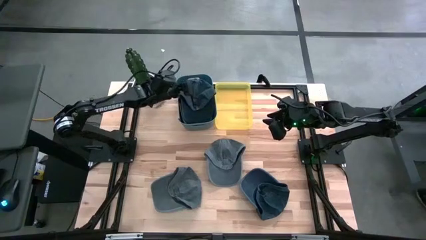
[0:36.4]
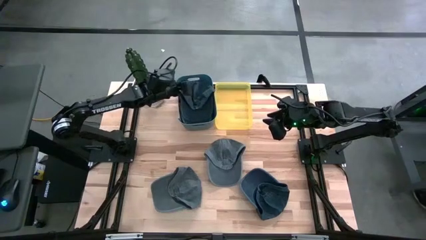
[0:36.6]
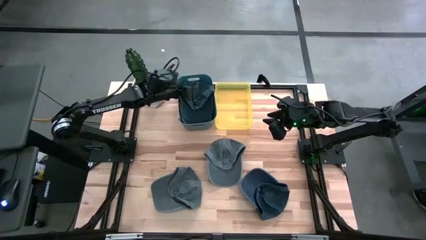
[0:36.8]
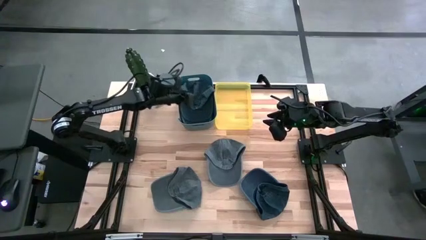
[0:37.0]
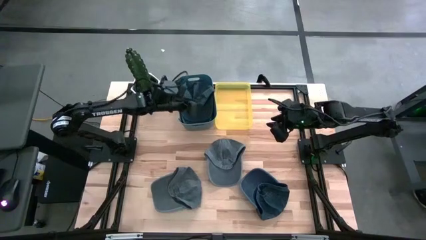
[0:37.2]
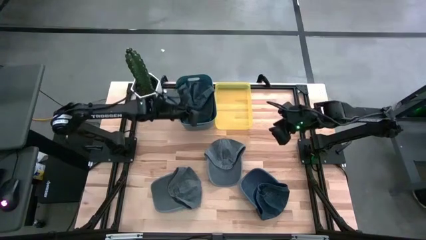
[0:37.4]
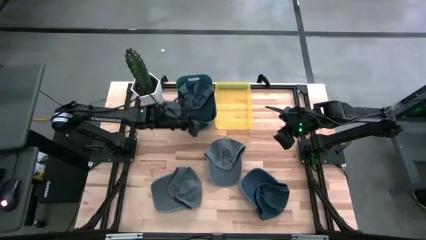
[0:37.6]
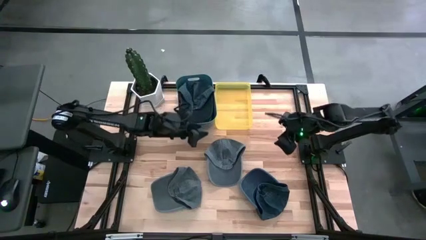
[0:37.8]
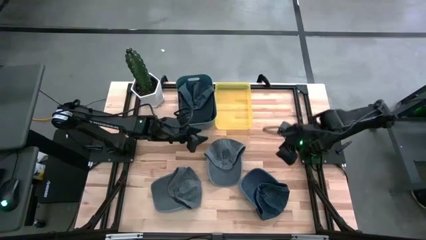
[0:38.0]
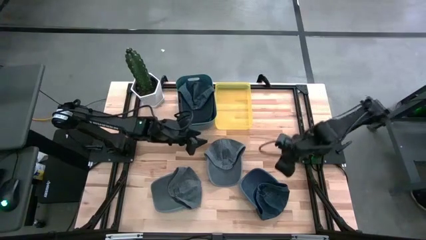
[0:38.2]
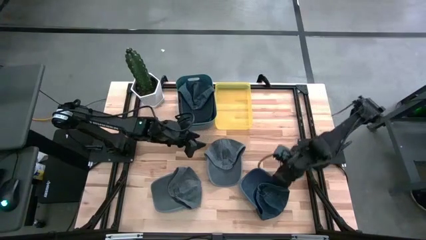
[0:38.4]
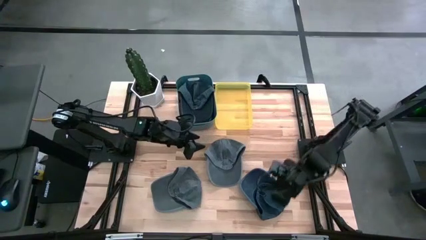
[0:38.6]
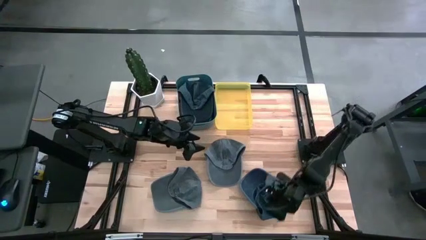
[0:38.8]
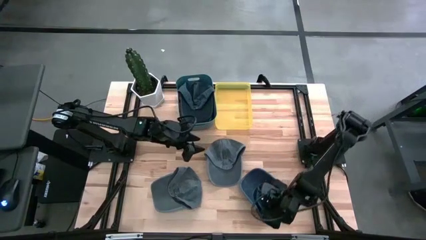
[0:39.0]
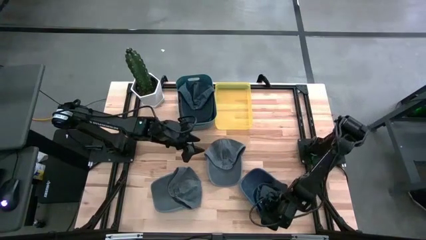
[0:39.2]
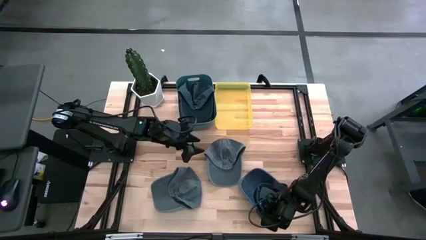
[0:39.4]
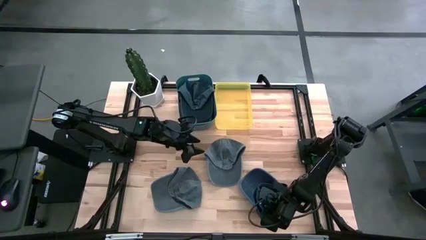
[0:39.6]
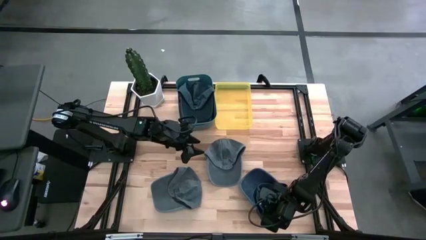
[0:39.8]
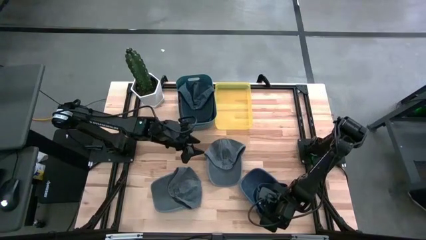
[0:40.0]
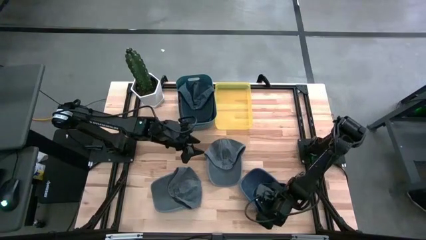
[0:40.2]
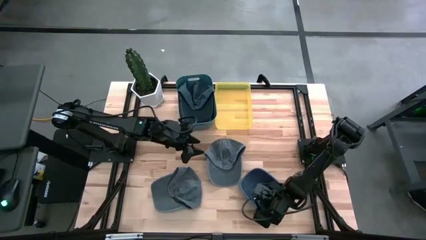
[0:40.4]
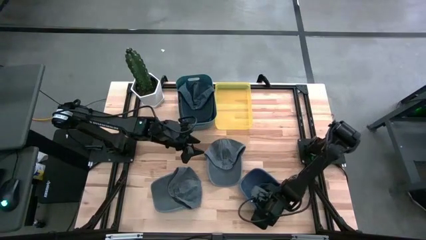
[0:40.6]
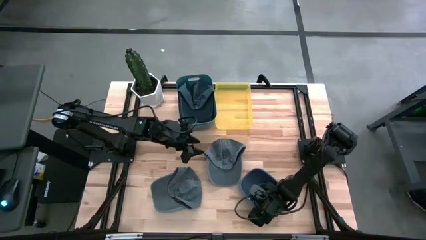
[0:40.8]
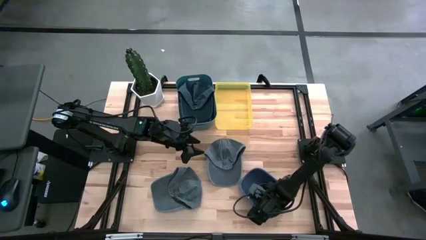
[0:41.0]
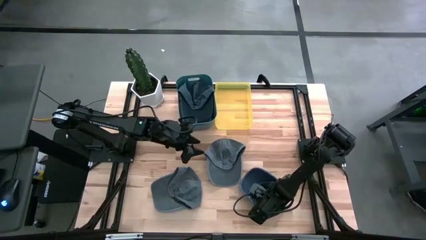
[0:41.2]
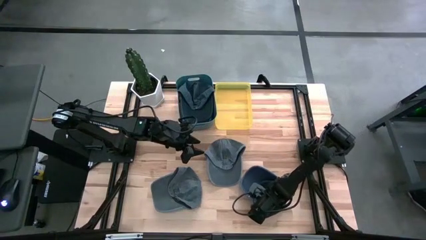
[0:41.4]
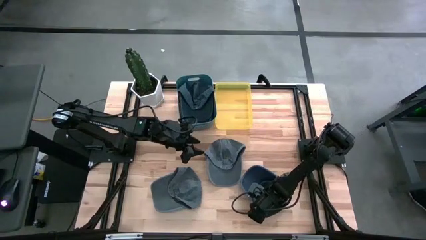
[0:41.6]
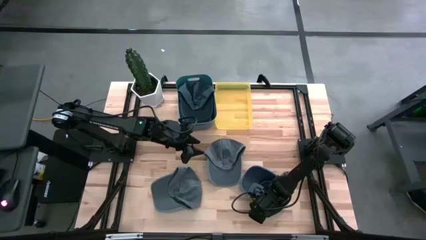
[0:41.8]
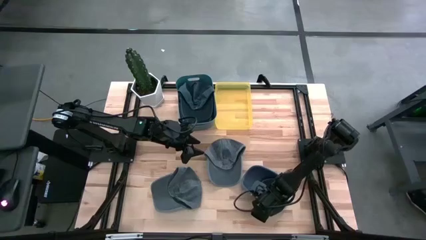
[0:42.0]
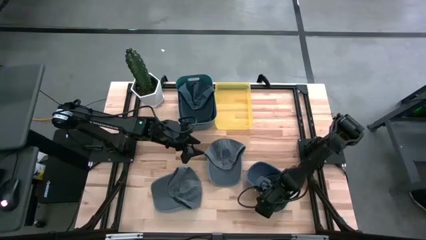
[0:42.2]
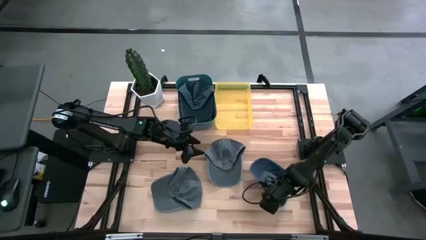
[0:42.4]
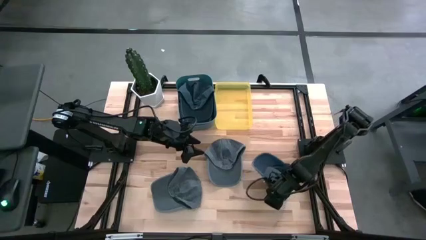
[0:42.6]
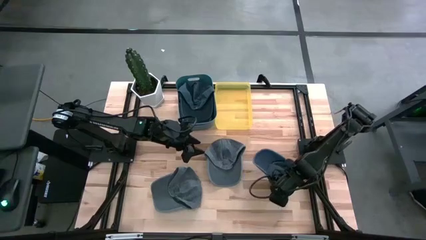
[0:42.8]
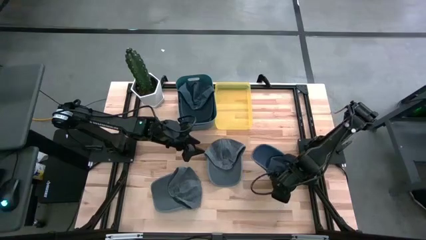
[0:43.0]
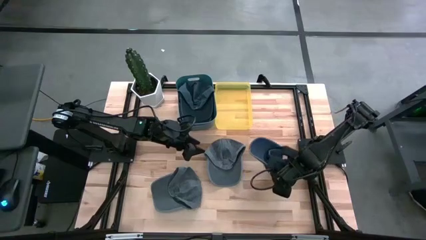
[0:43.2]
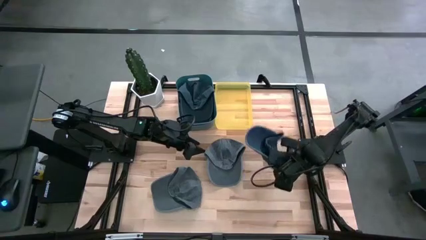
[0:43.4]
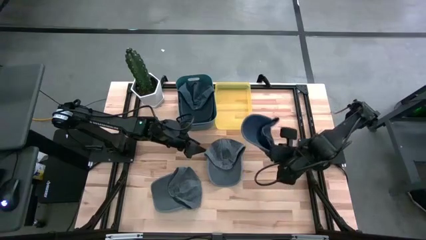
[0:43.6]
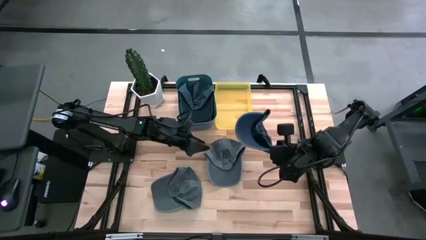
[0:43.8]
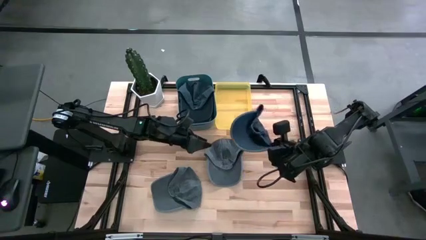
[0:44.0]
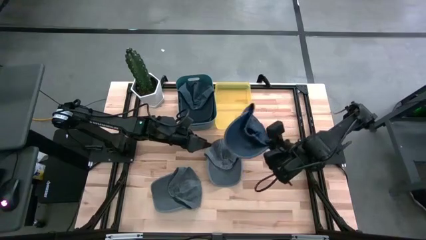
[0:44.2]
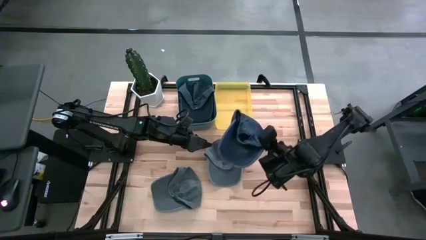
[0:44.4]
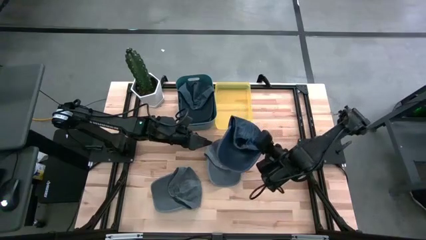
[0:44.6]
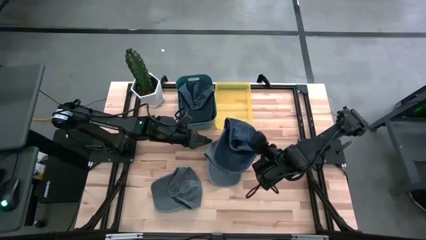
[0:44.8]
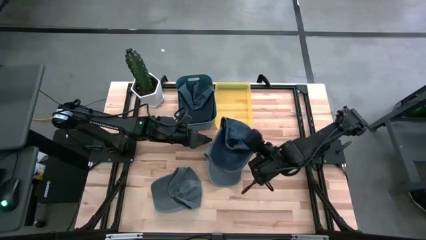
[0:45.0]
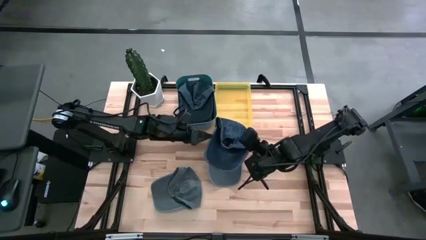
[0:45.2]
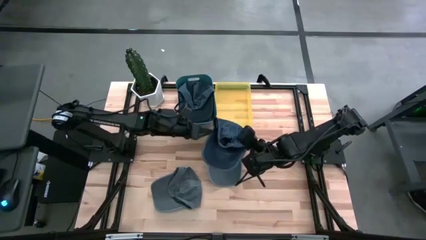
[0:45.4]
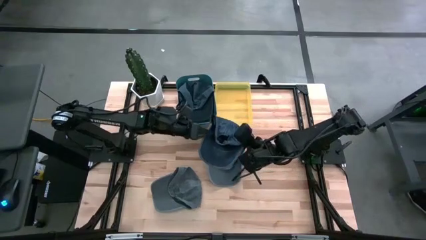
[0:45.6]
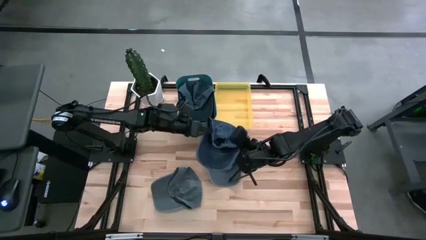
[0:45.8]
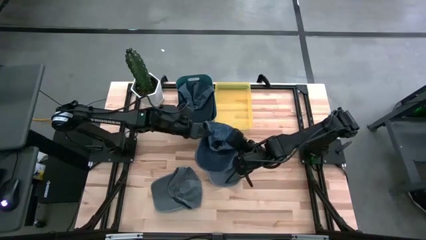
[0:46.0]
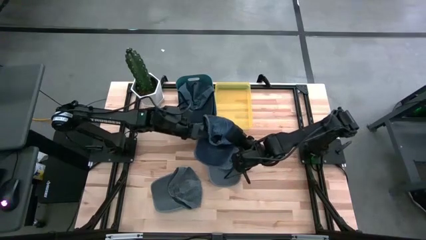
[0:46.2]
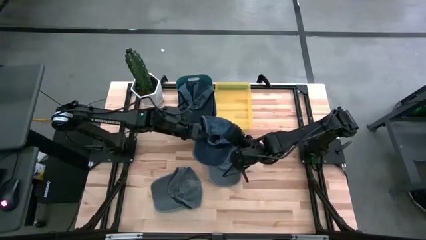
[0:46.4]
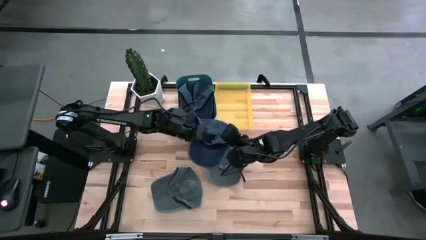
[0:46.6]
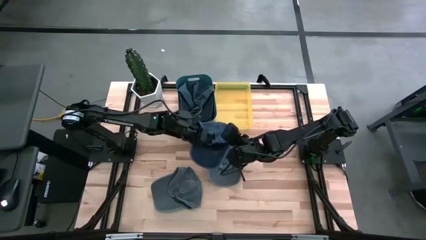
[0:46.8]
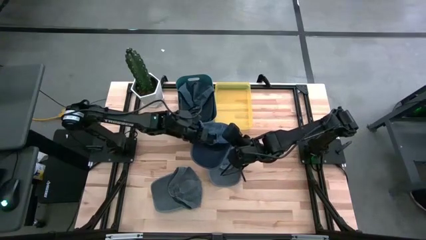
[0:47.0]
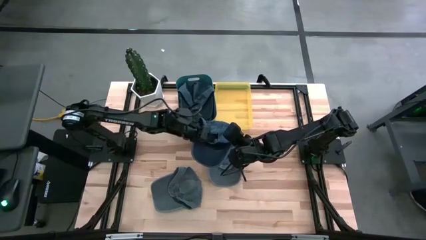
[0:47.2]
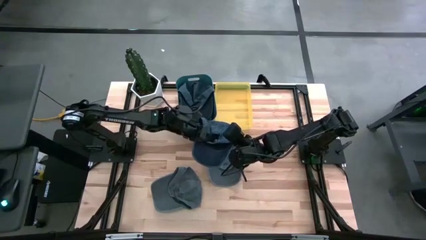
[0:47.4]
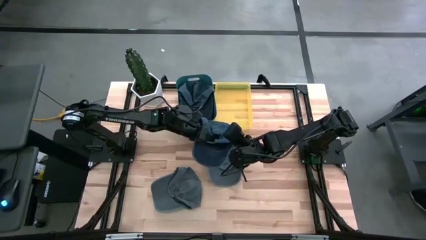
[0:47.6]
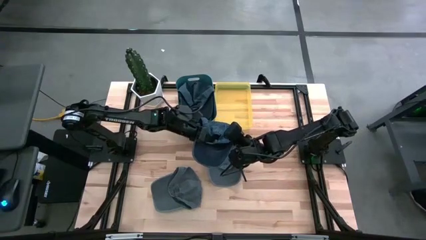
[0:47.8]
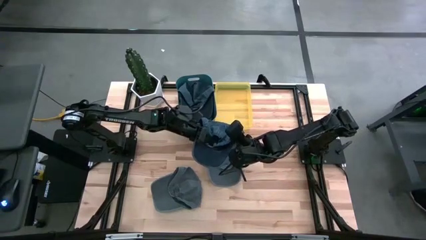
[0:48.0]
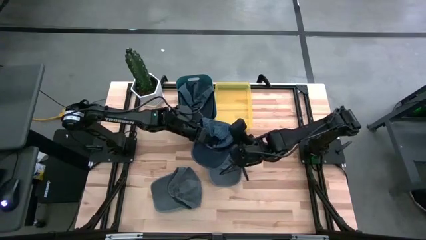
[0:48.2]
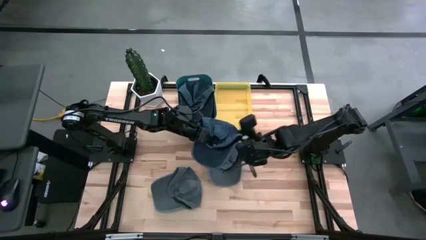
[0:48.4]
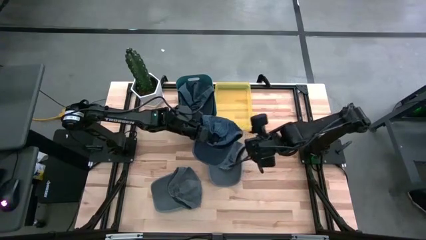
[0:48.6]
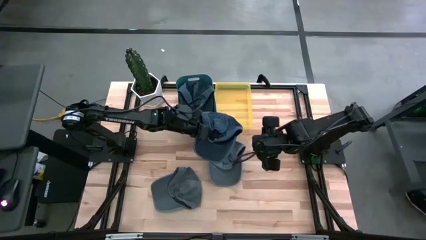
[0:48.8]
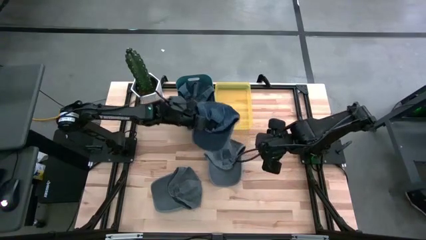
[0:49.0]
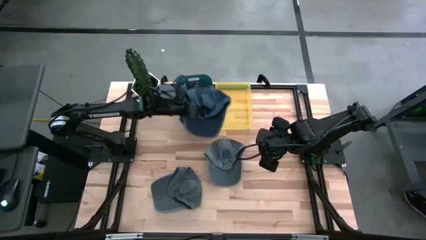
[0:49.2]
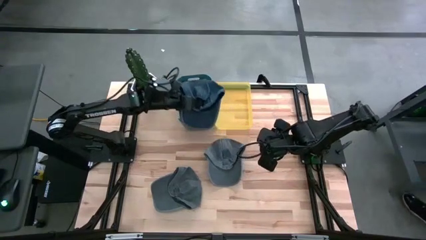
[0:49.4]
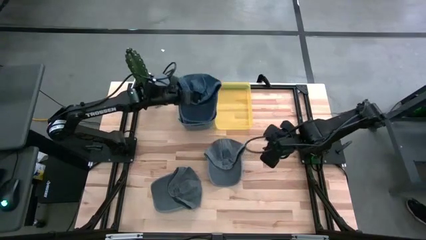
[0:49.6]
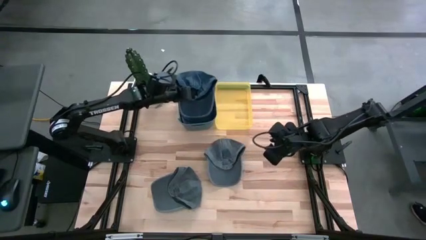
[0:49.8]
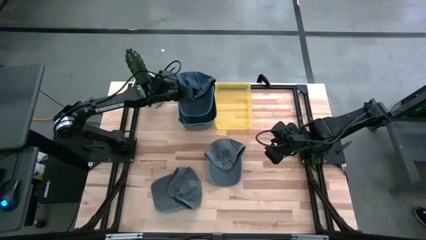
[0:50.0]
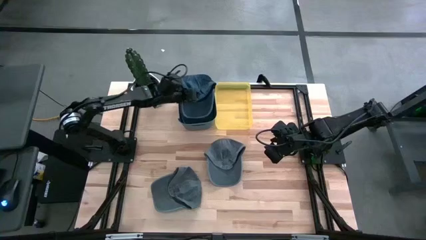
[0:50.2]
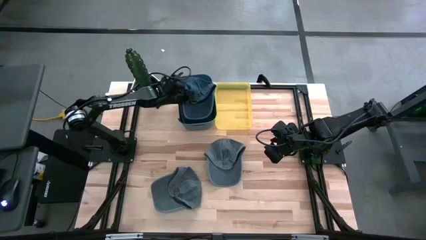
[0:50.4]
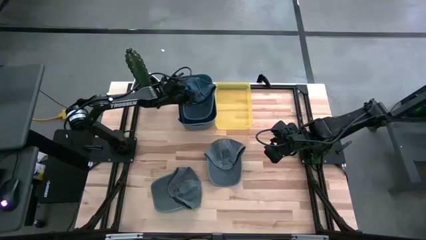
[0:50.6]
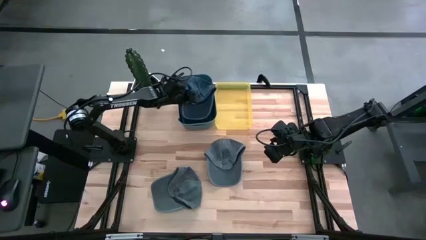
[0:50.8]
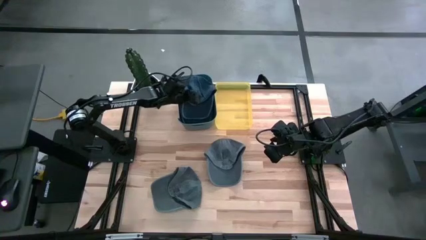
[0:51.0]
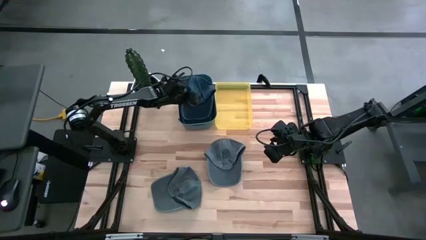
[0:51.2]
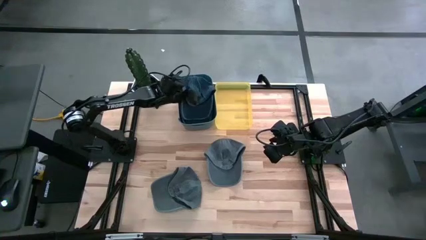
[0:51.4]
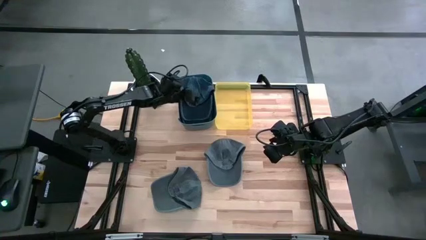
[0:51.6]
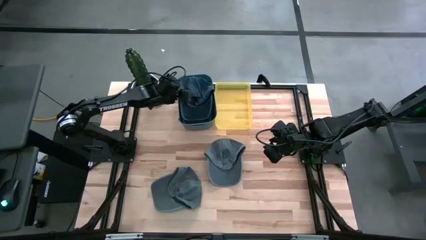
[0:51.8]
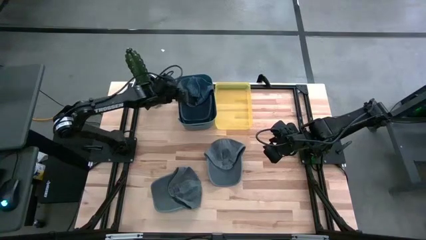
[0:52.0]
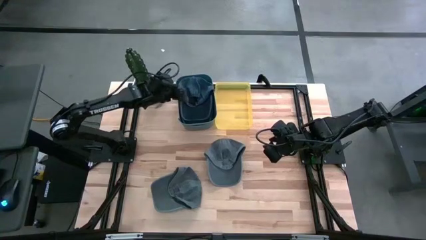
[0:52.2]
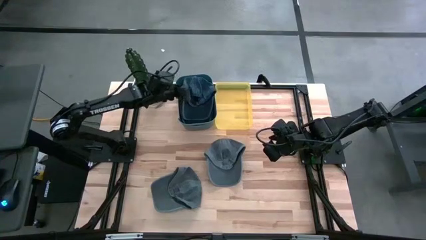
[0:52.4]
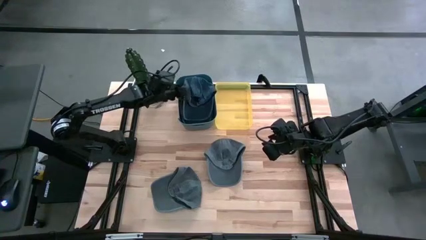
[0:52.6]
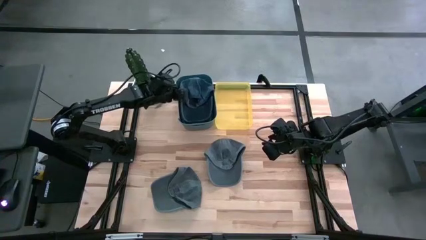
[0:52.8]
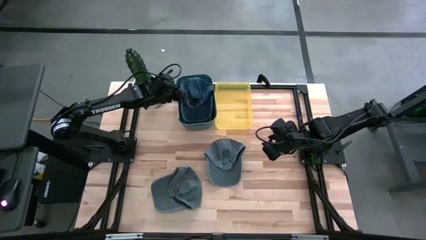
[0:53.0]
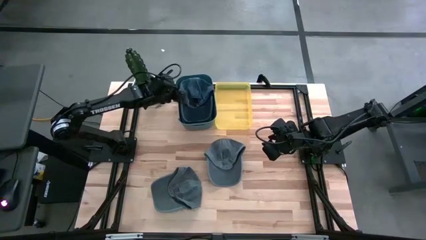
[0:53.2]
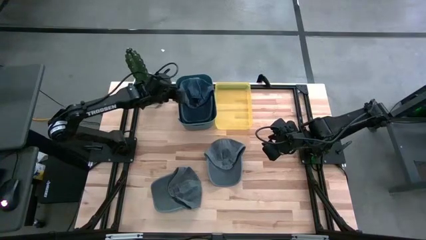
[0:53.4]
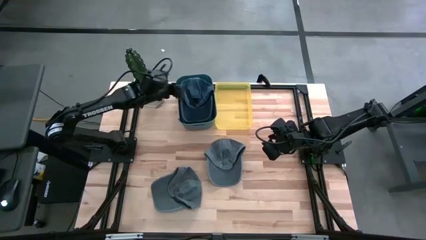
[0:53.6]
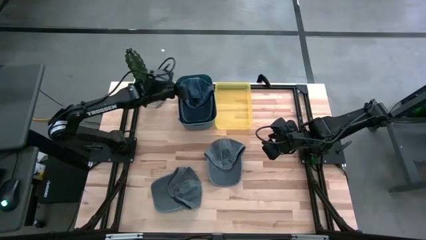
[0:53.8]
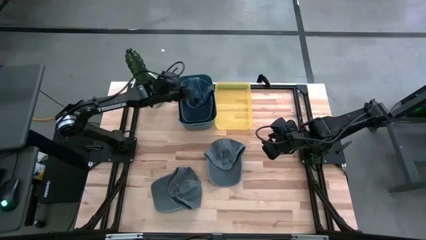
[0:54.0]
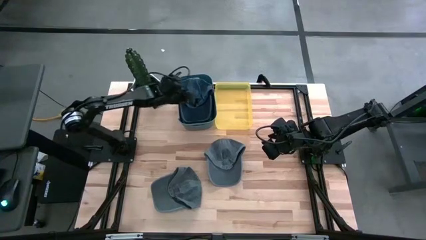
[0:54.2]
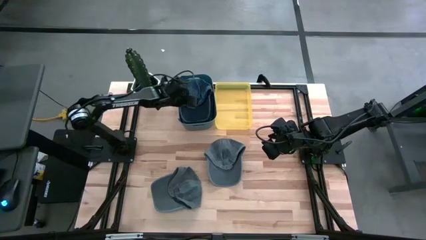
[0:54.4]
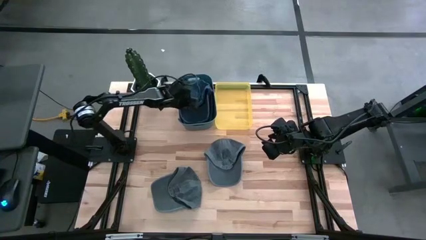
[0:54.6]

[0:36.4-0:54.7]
Task: Pick & Place hat
Put the blue cap into the blue bin
